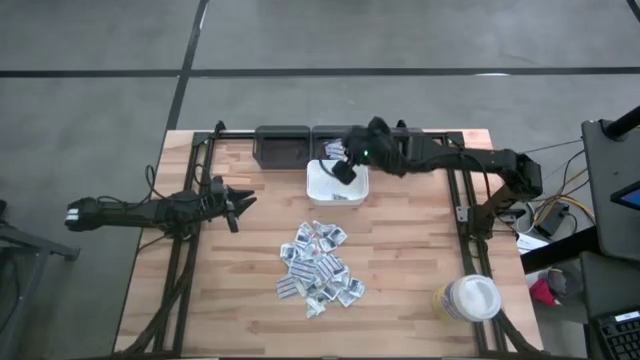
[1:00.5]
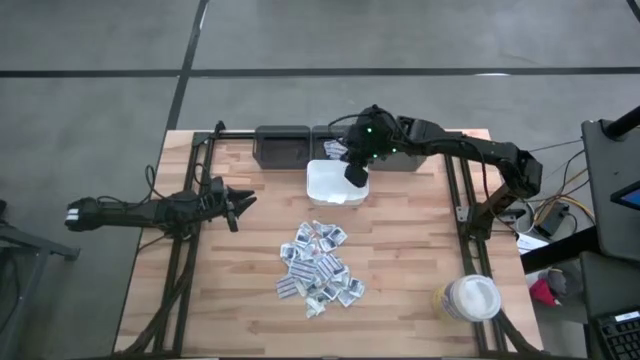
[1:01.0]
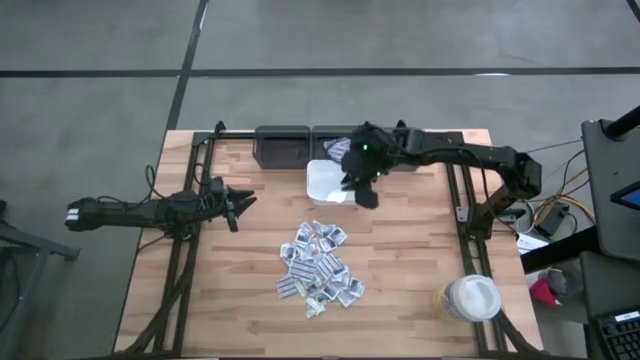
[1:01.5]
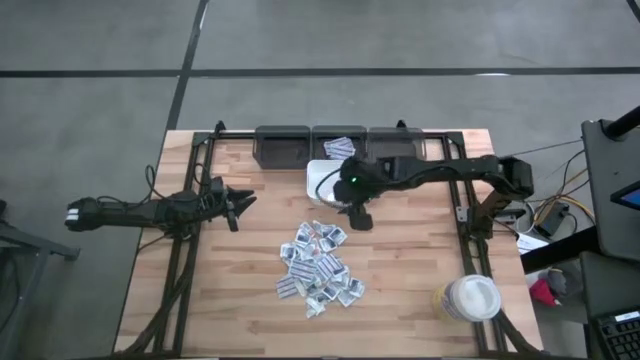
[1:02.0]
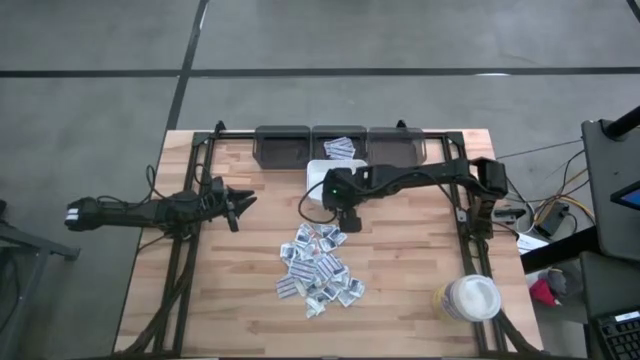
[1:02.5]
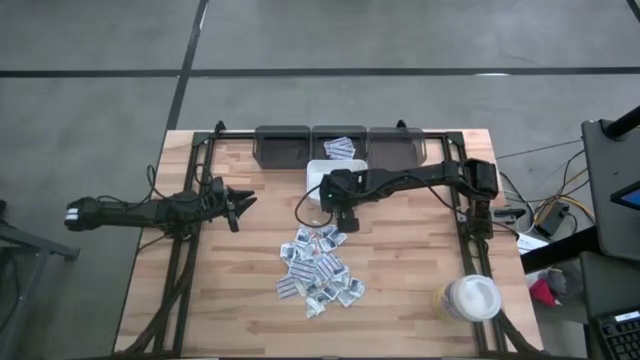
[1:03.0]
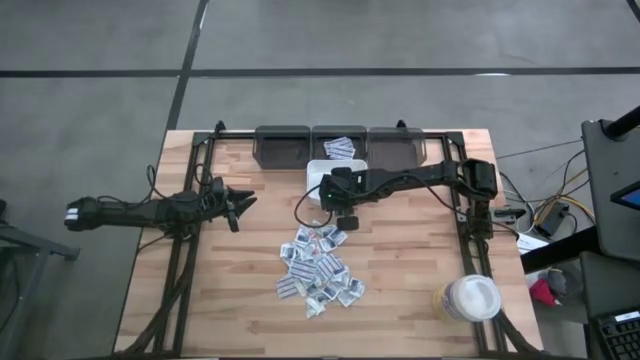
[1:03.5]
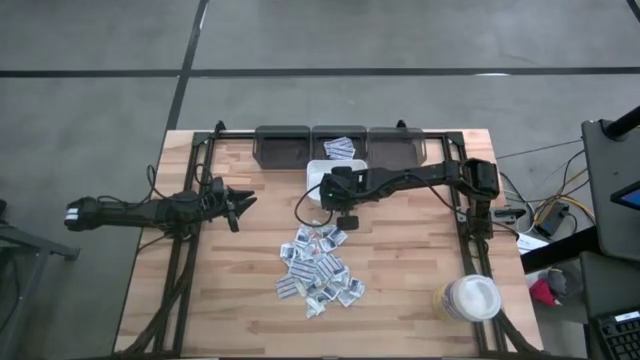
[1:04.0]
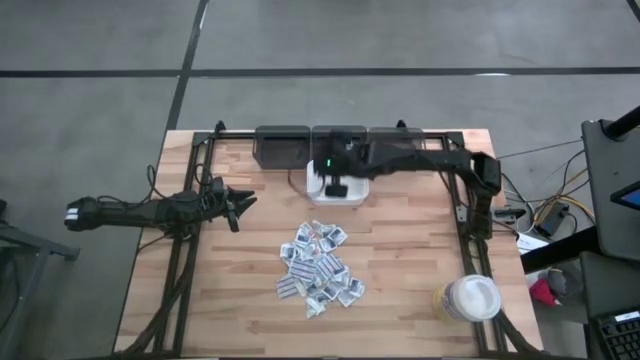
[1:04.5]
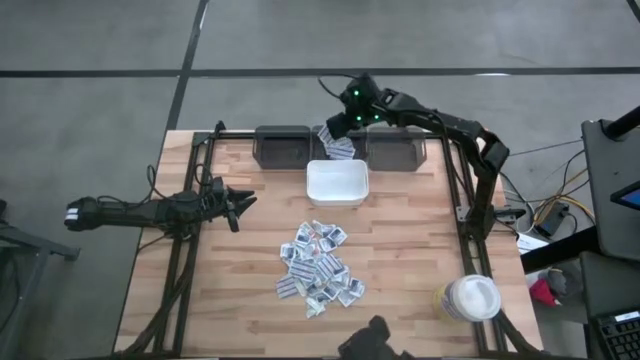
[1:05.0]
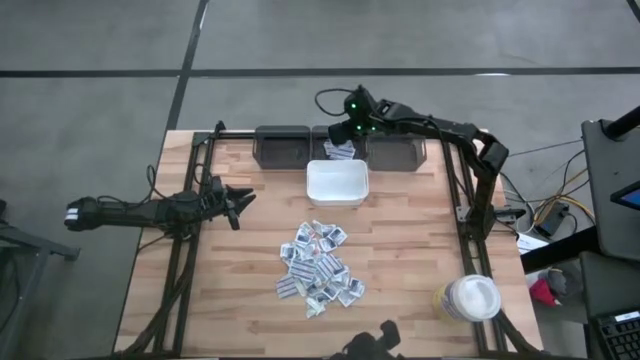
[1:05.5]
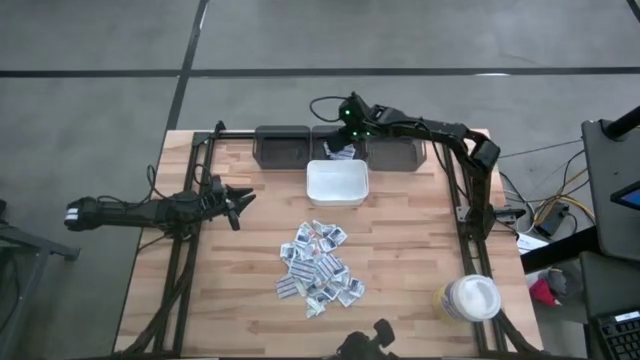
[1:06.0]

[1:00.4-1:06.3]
Task: Pick & Place First Aid Supplies
Put the blue bandage into the middle black bin

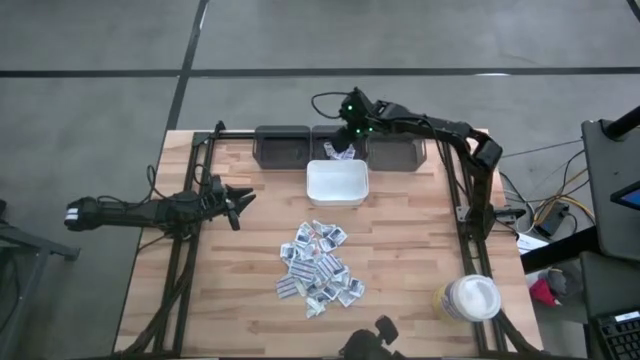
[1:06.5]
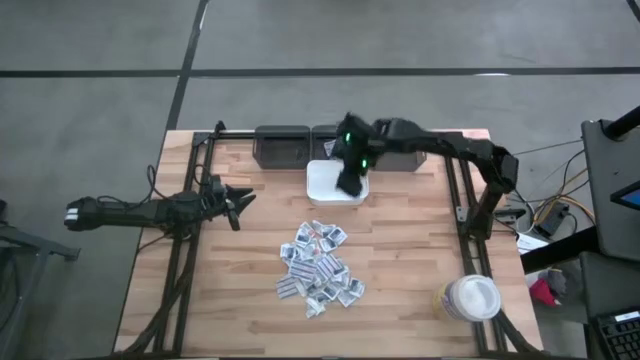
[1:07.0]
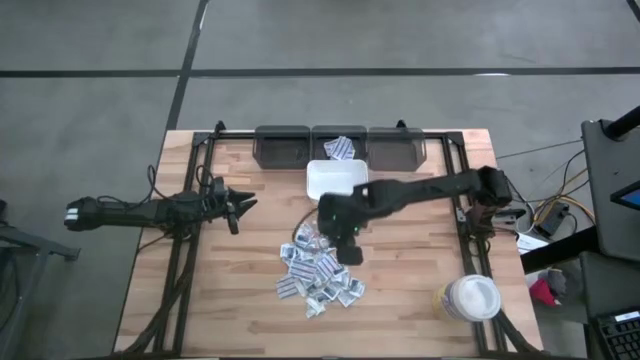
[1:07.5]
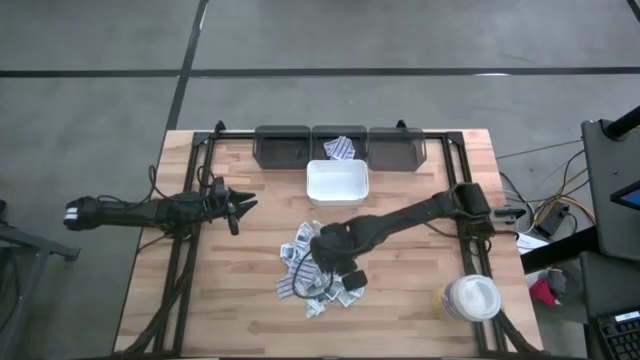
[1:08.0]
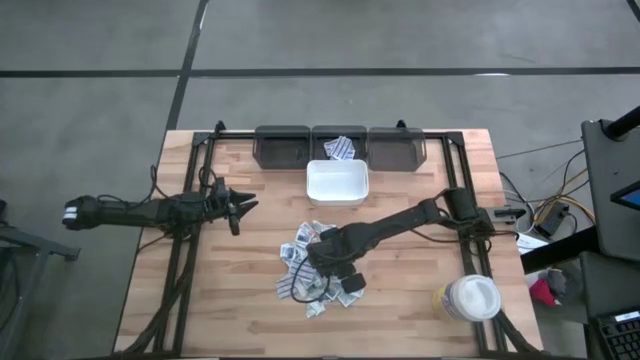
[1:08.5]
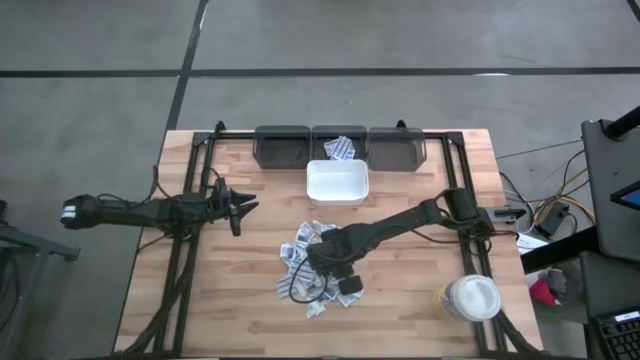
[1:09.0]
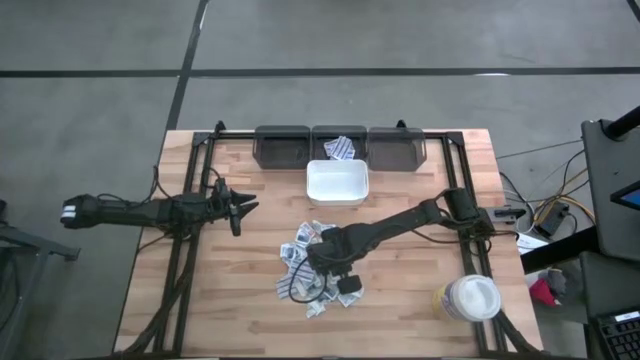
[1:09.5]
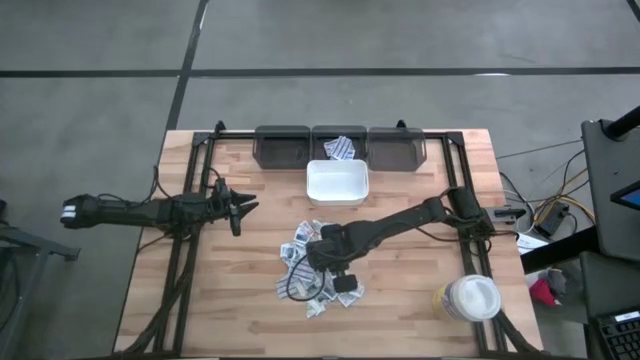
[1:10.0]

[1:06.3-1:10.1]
Put the blue bandage into the middle black bin

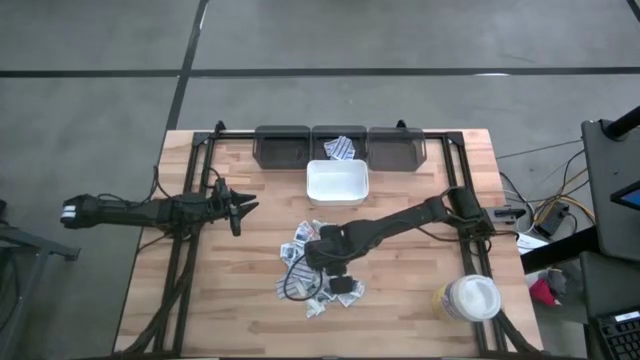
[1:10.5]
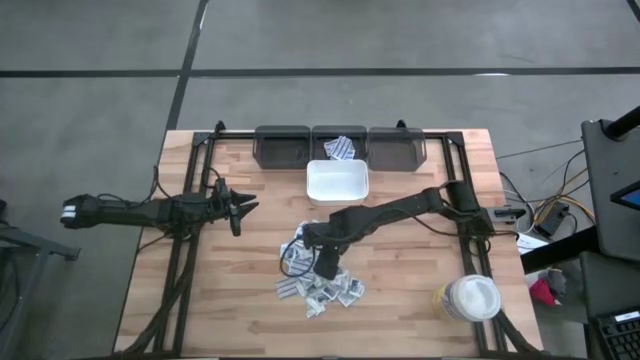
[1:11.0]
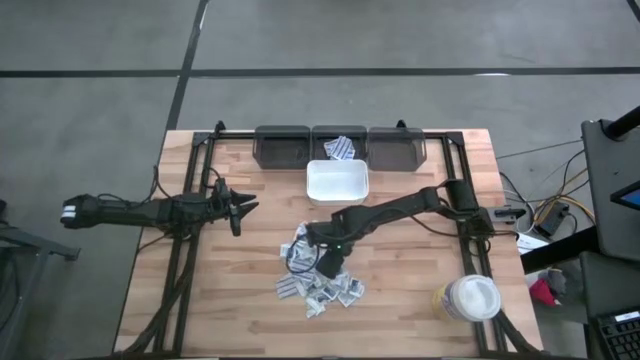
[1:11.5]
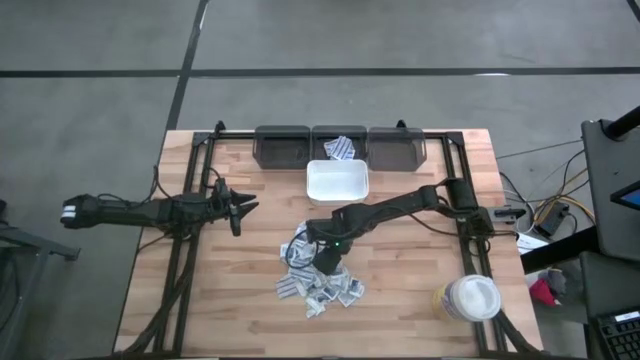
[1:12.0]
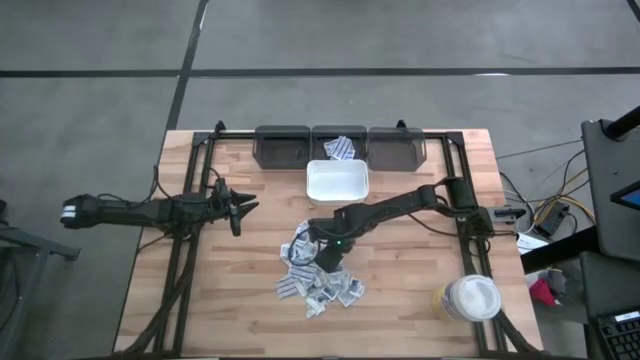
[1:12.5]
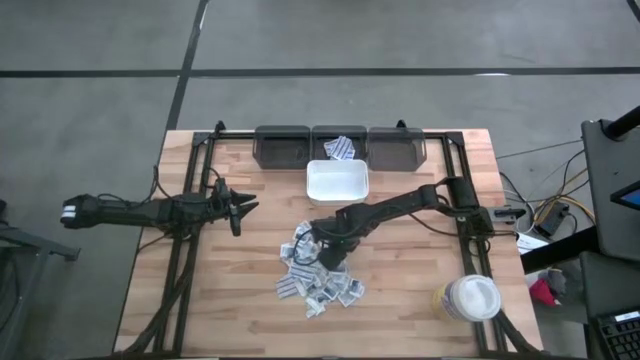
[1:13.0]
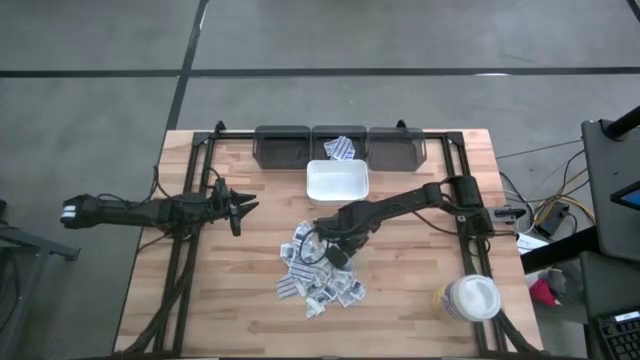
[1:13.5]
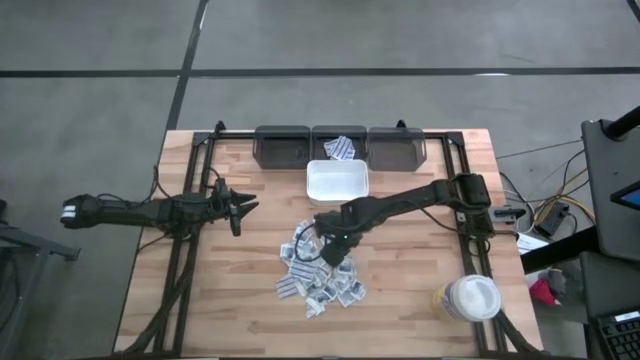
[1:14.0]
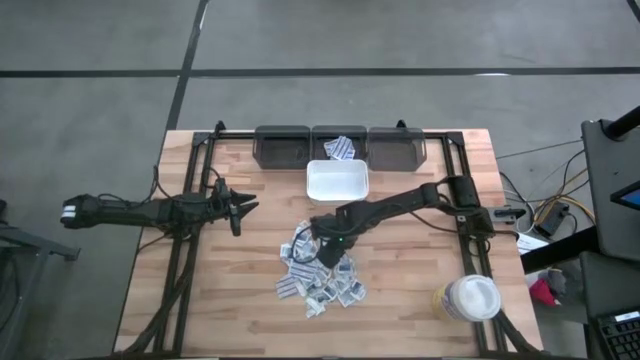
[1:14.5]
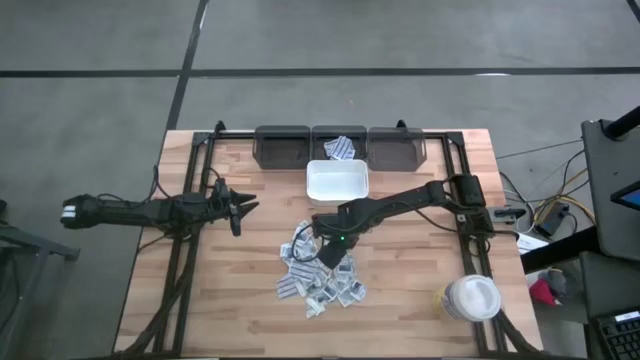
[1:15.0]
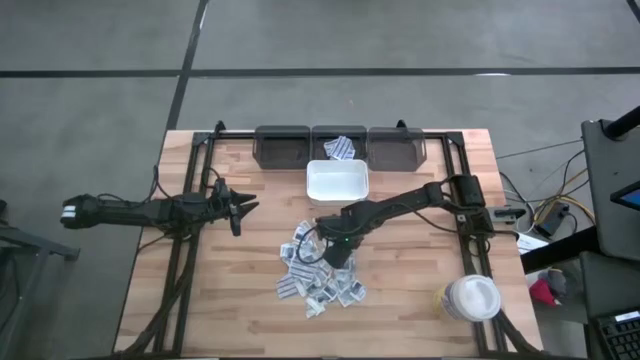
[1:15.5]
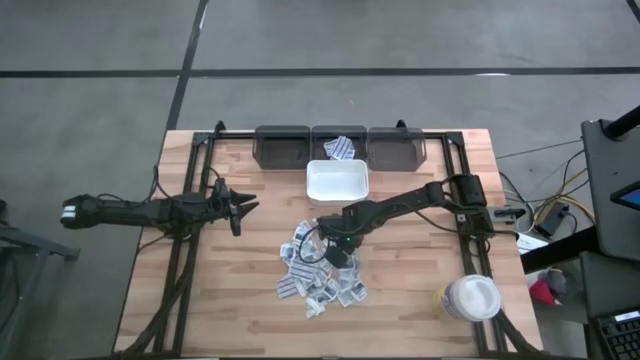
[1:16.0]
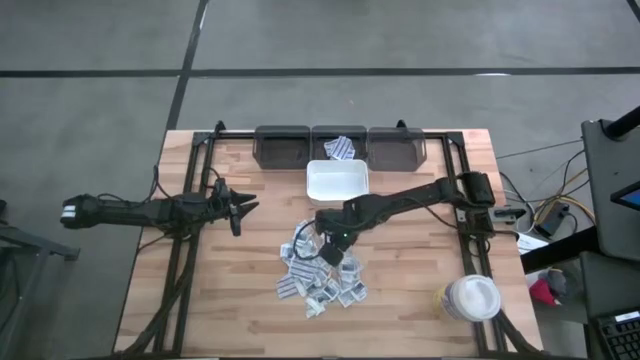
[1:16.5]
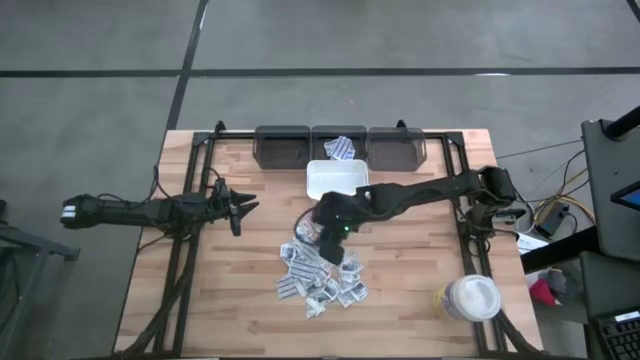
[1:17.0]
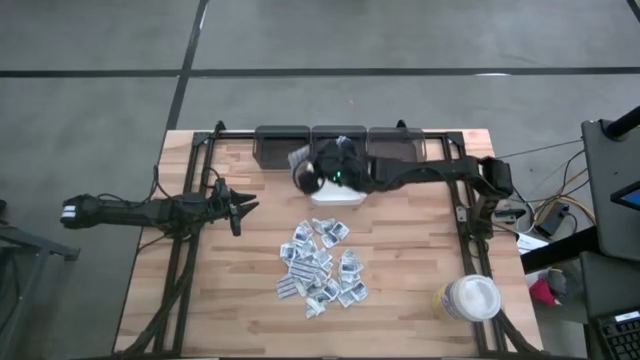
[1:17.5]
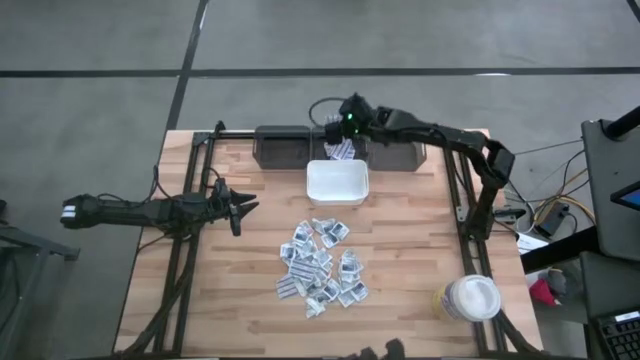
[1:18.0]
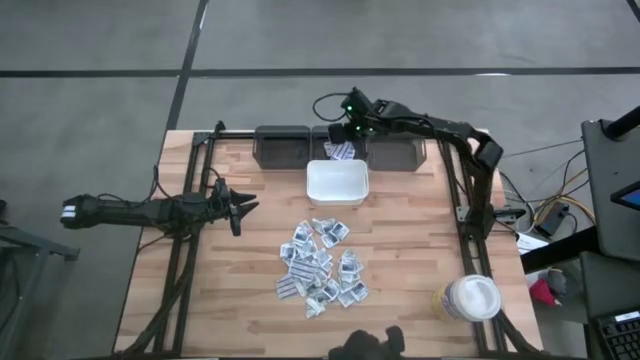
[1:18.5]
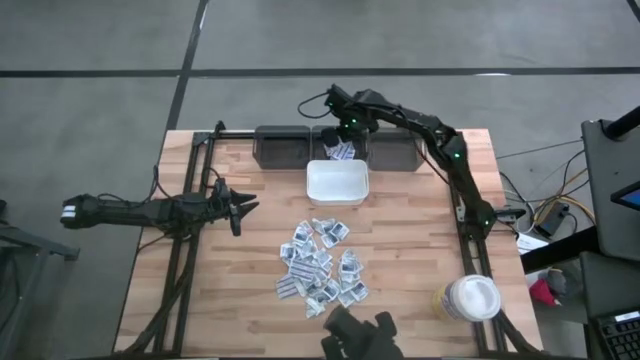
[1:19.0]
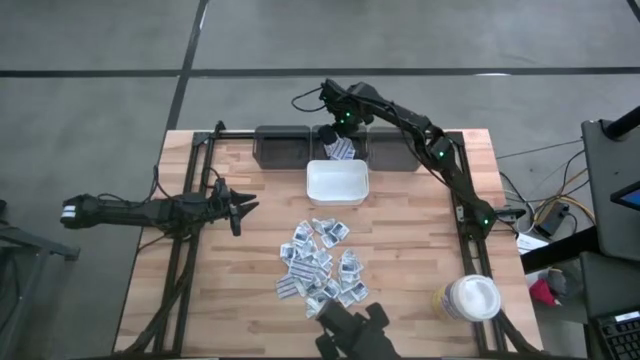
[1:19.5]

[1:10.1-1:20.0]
Put the blue bandage into the middle black bin

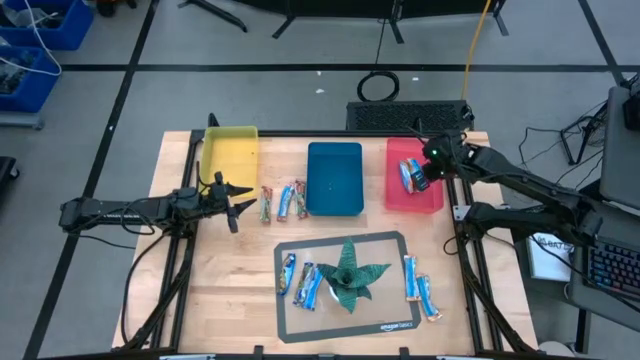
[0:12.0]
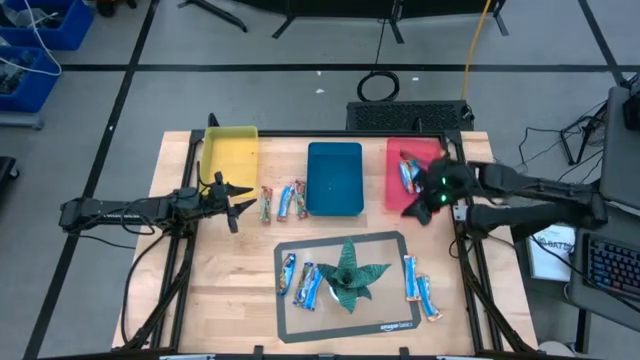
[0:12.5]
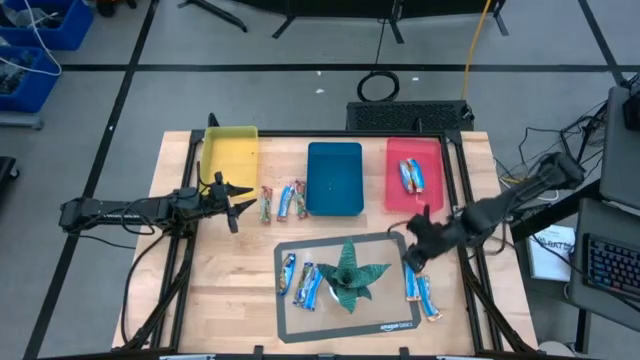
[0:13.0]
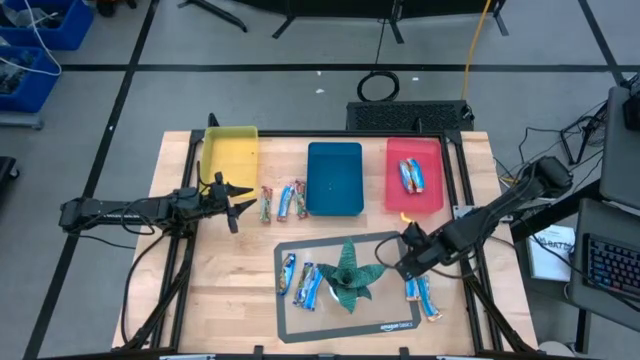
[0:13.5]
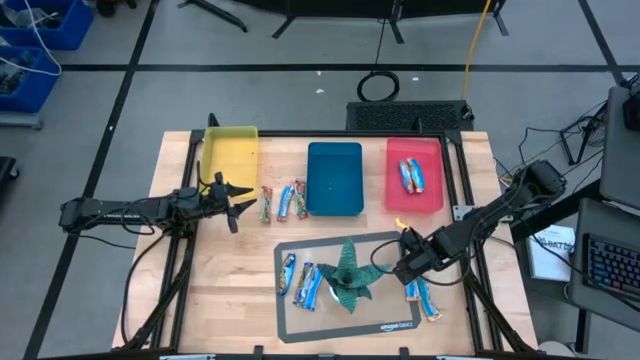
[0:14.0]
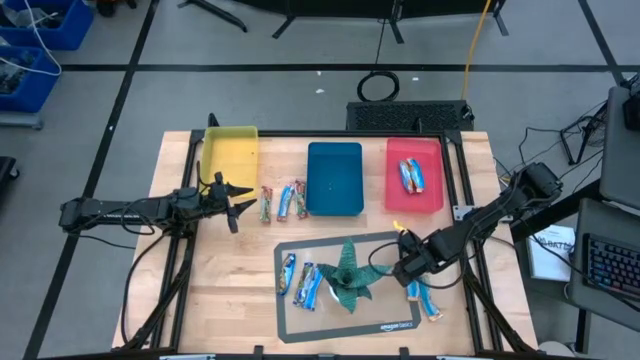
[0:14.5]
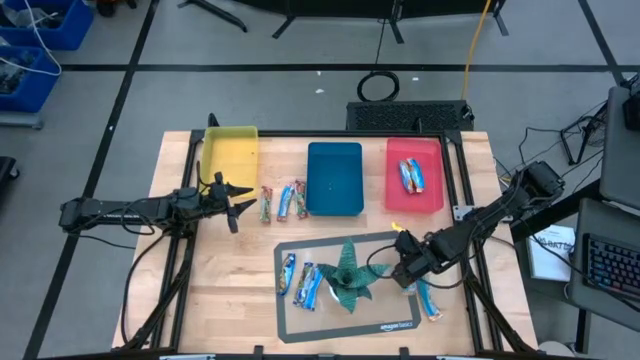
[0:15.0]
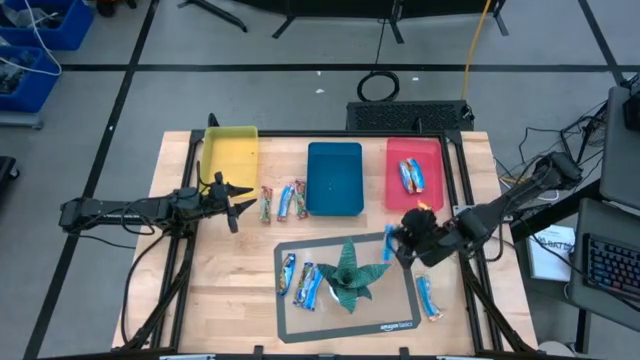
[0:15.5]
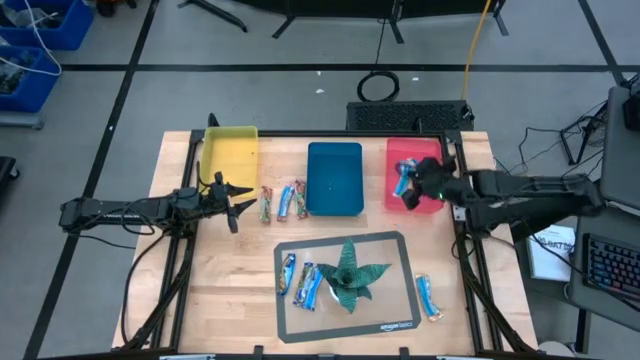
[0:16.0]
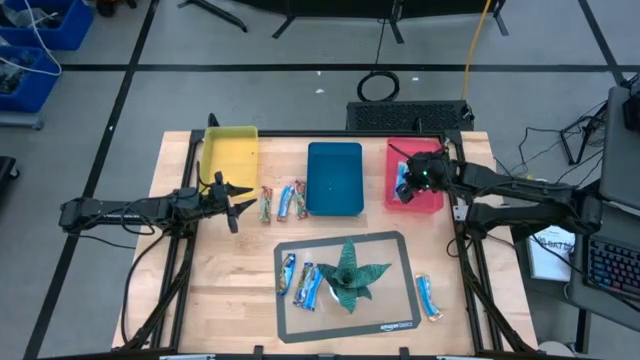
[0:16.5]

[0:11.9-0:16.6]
Task: Pick and place Granola Bars by type
Put the yellow granola bar into the pink bin
